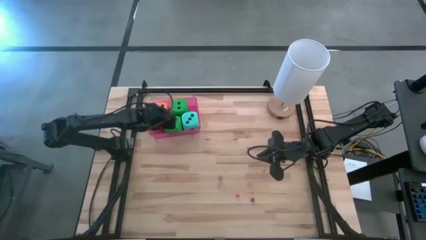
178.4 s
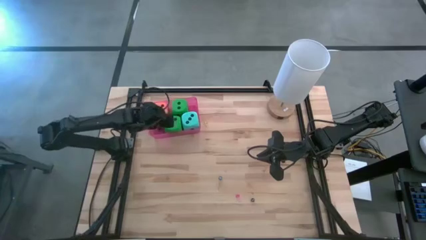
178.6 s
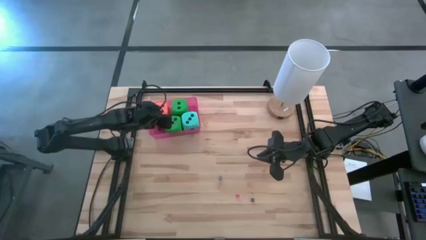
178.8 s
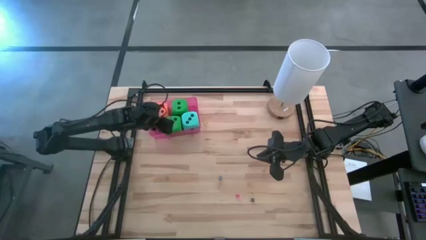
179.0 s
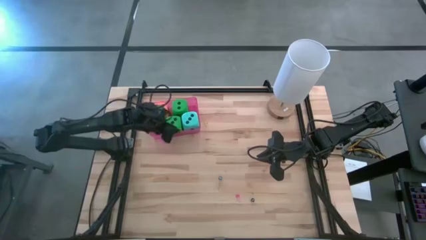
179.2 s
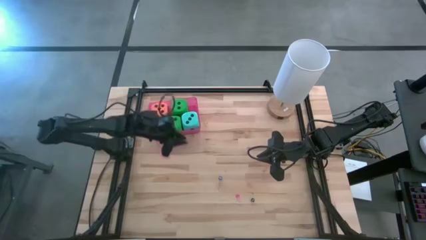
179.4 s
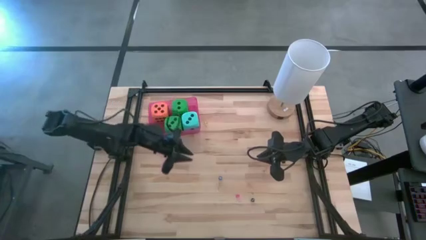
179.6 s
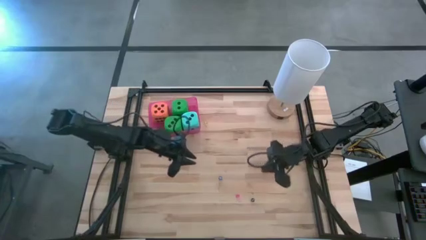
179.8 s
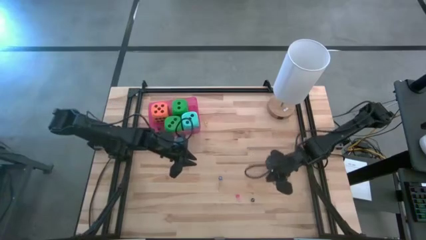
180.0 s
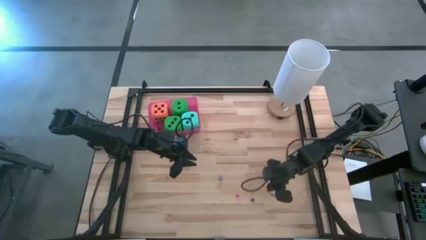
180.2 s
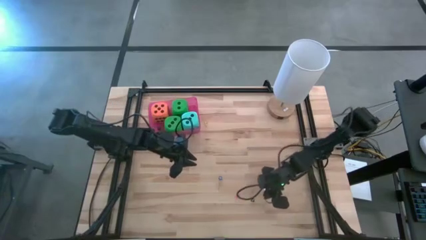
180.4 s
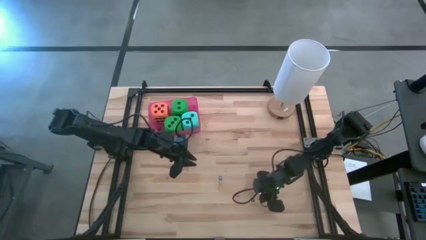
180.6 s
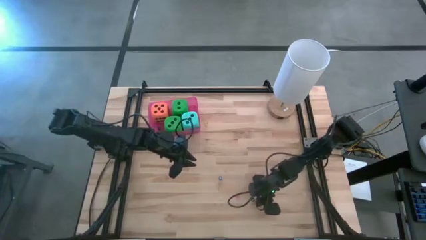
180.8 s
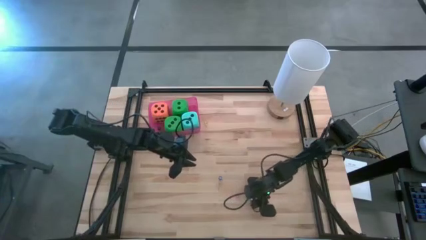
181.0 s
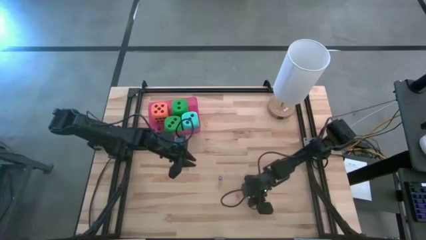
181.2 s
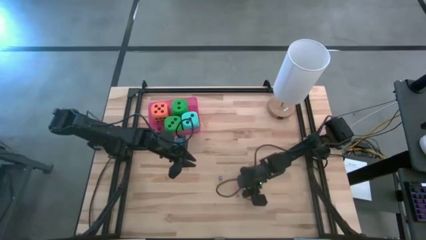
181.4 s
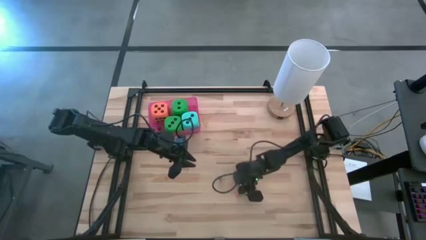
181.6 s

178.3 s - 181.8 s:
Task: Pick & Place Dice
Put the small blue dice into the red bin

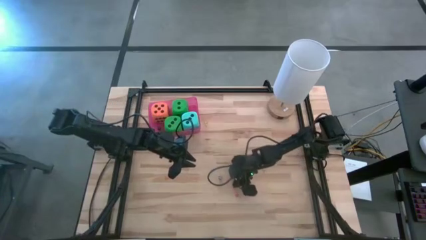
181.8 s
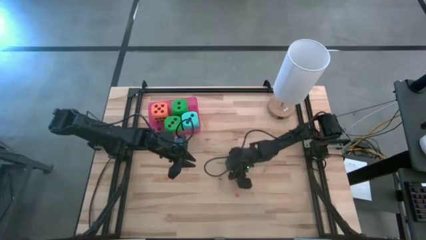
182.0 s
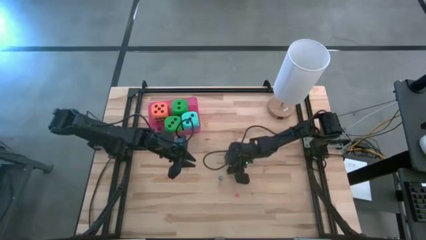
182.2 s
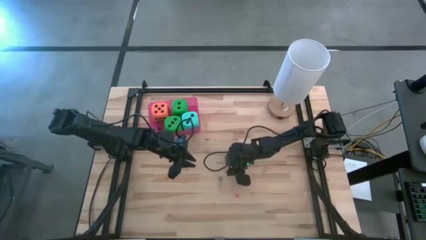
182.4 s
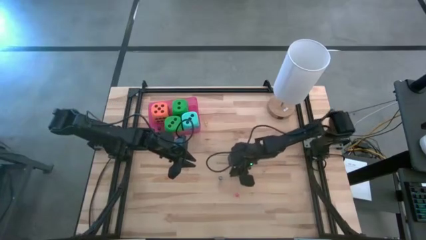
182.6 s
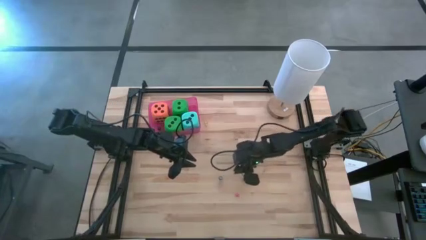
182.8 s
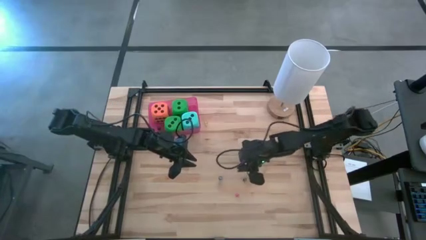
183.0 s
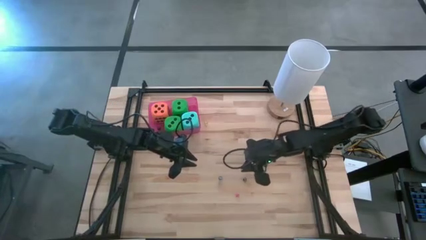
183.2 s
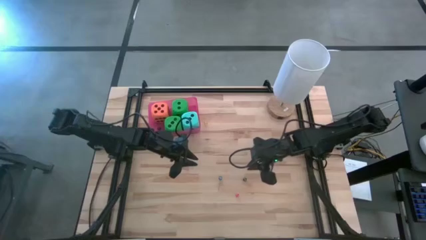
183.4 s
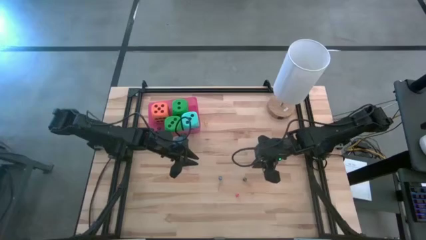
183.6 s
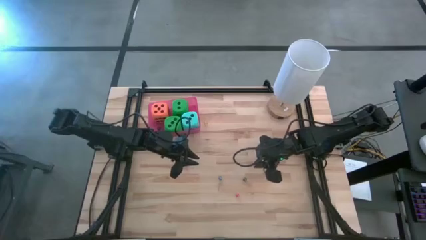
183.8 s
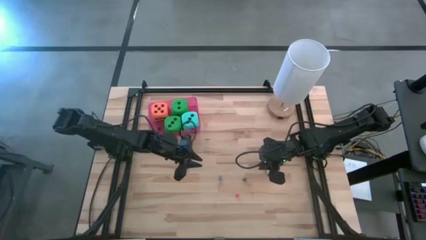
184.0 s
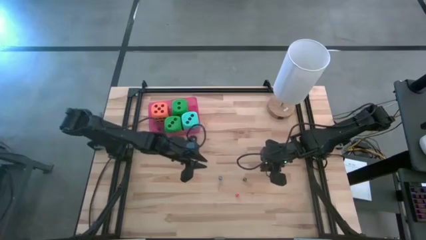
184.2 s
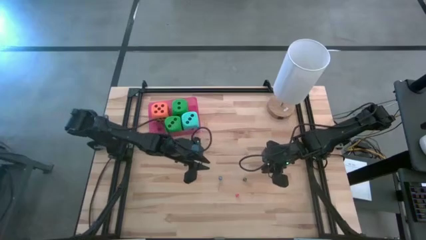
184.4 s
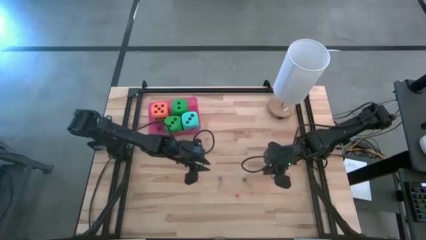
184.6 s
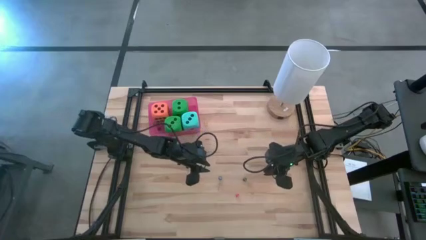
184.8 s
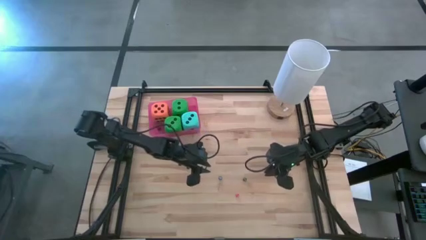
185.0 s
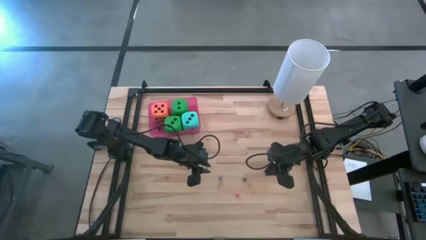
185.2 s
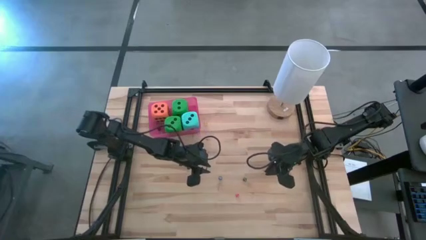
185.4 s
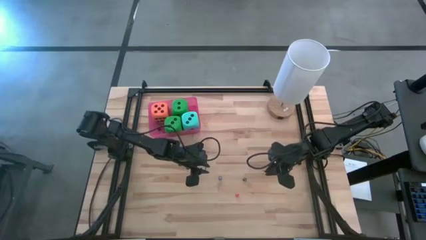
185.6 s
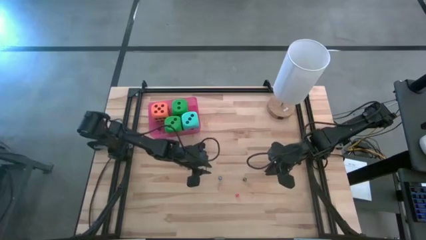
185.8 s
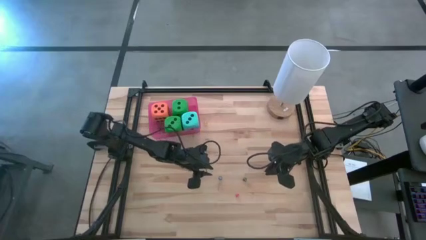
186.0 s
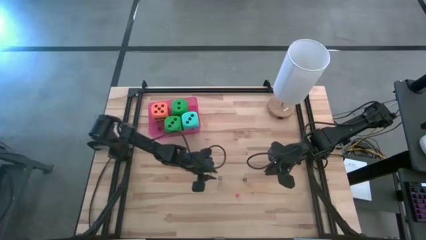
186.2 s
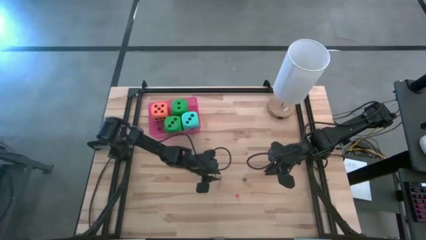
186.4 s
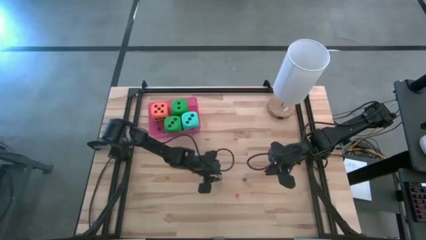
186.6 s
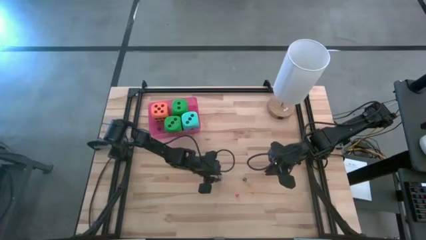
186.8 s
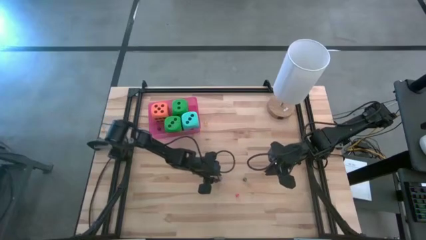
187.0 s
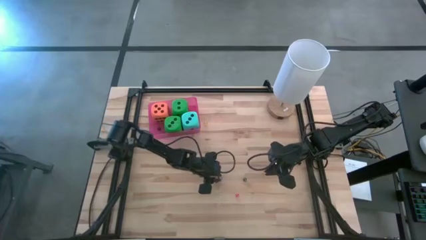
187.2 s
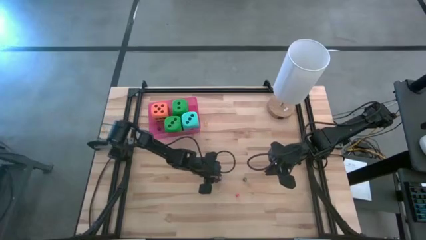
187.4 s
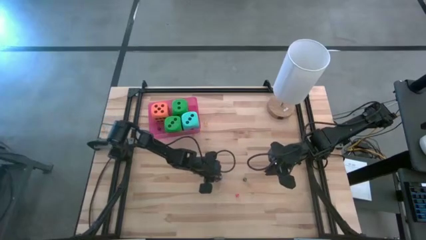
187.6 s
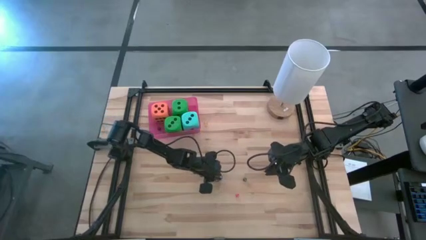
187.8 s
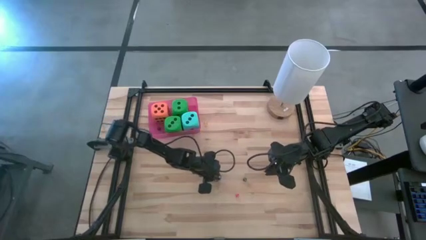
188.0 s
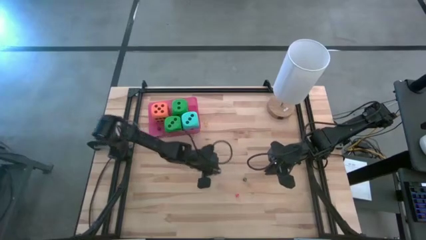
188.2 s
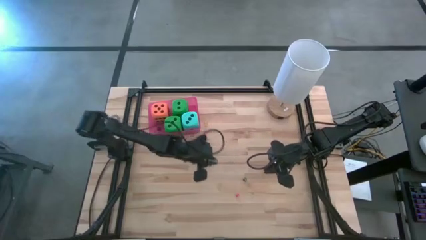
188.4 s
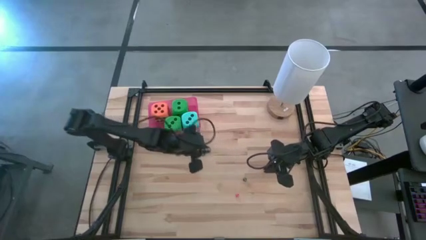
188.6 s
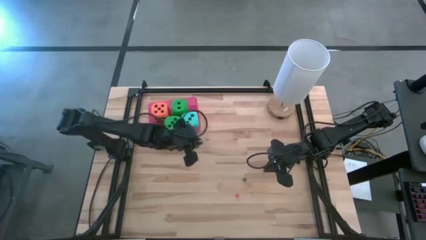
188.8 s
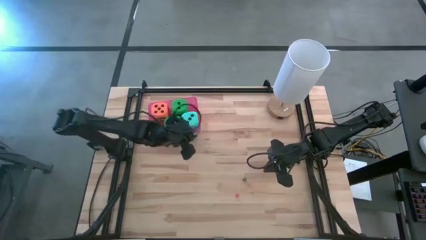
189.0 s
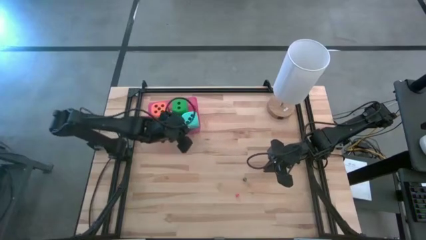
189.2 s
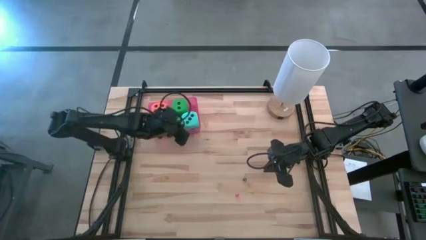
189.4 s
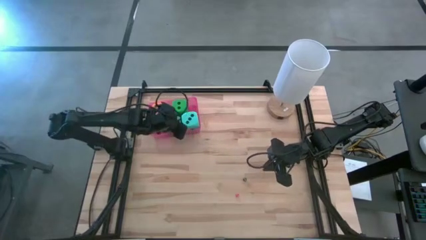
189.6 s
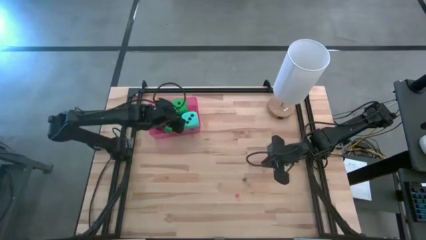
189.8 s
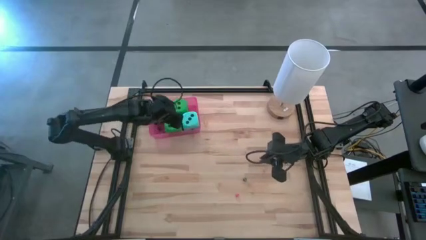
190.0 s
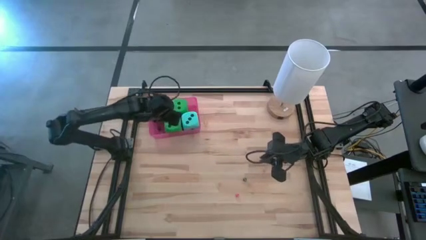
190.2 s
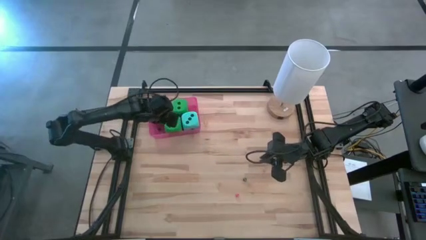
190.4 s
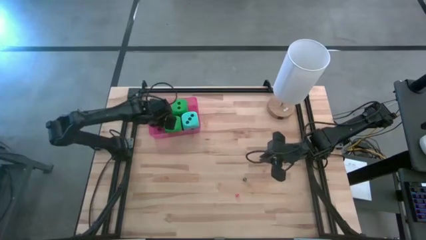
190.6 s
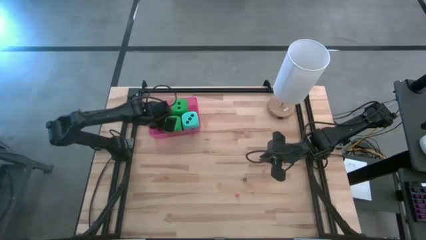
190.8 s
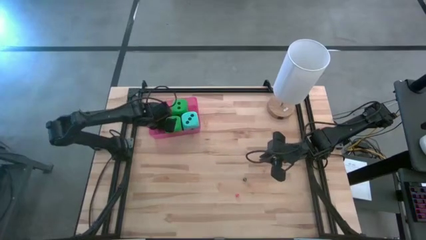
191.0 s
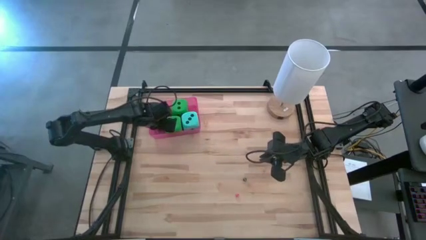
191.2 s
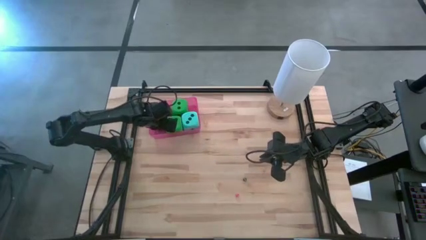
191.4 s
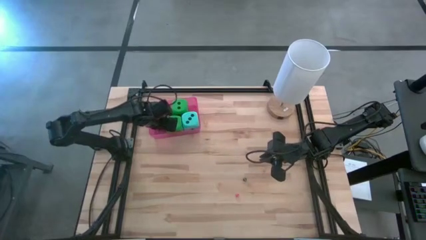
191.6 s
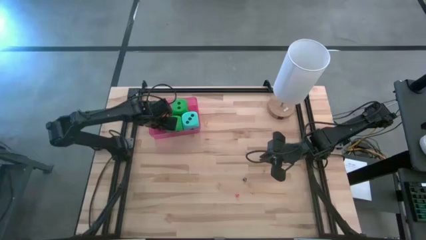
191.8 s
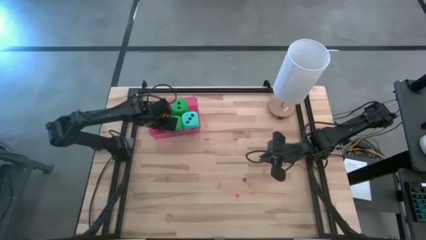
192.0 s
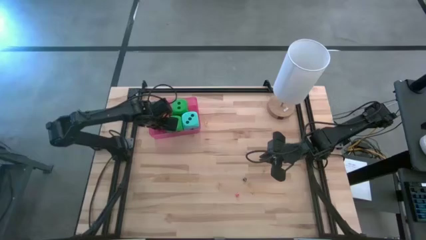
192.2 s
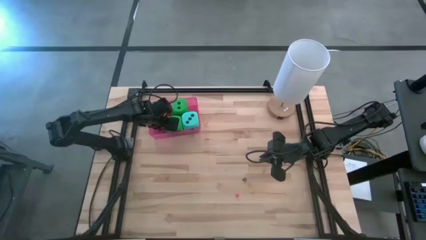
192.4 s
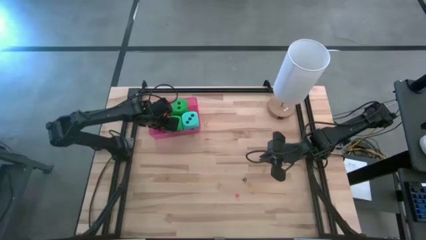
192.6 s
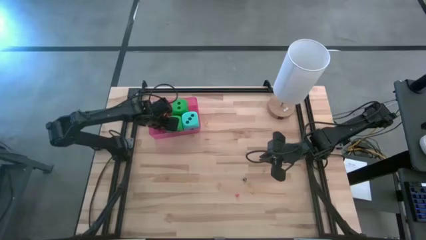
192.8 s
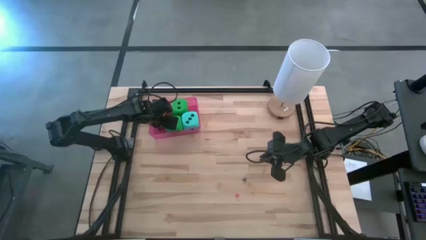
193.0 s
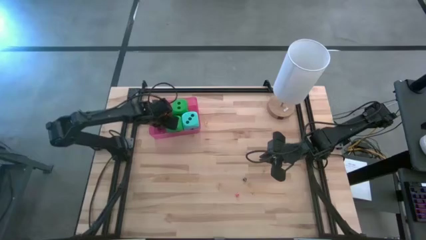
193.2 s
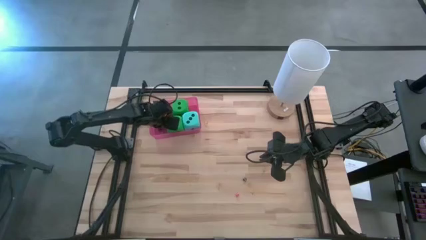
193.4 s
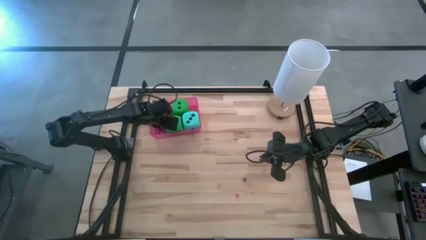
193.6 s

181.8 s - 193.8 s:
Put the small blue dice into the red bin

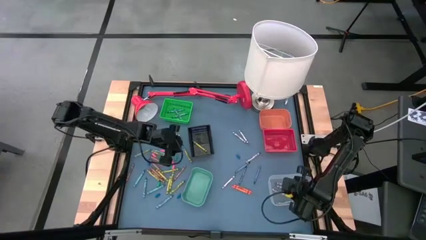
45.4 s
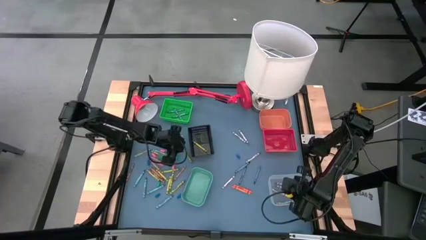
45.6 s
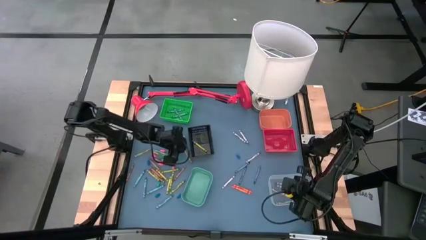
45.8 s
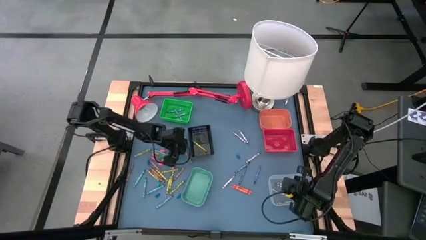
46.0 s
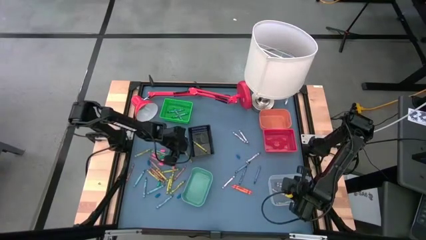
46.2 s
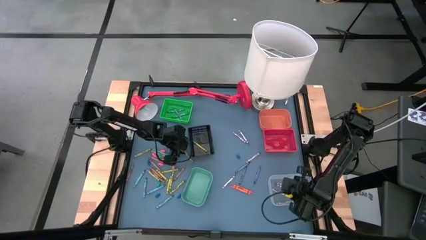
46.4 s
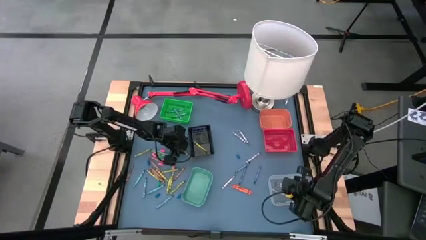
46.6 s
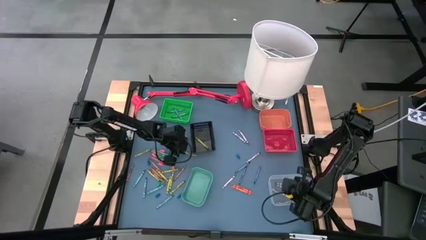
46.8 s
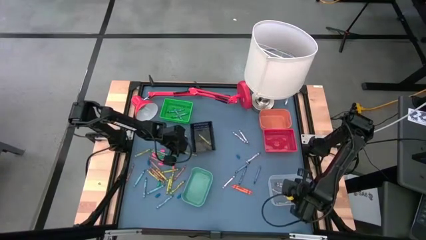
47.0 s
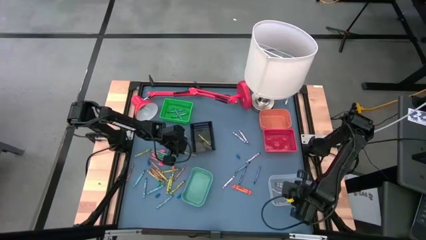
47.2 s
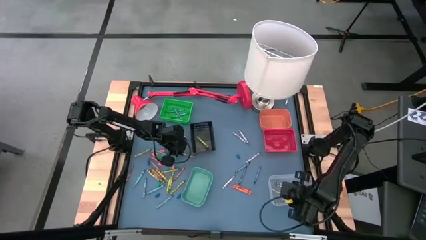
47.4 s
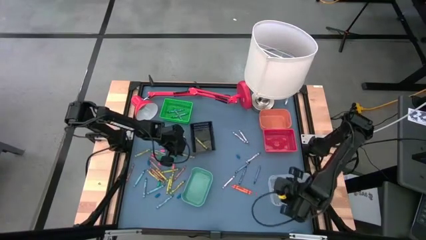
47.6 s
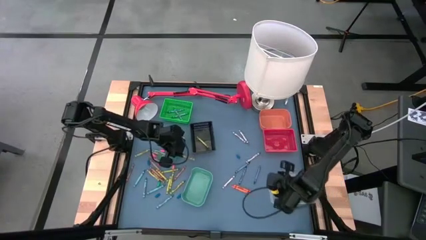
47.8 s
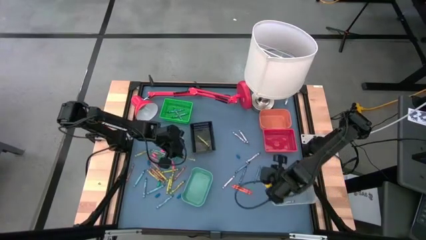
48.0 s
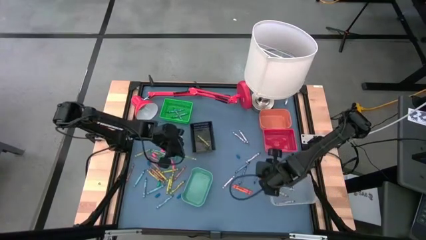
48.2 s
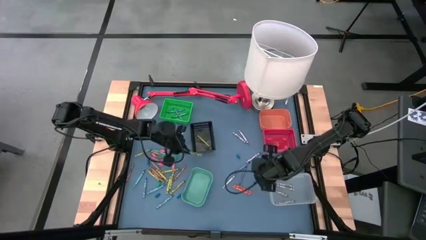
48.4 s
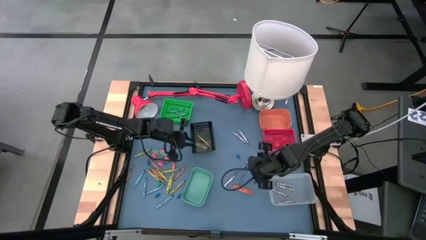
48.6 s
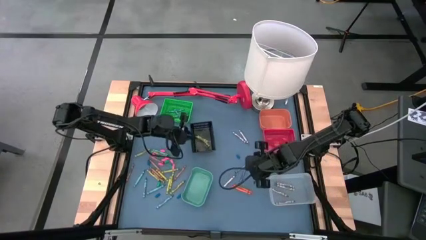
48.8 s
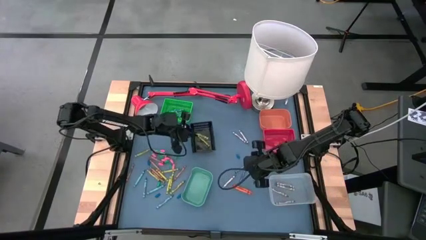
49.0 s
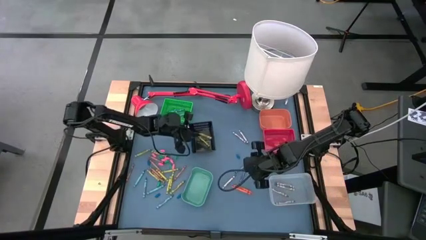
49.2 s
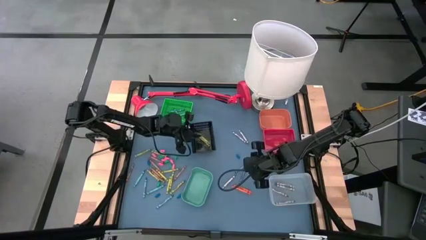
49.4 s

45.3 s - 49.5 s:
Task: Sort crayons
Put the green crayon into the black bin
